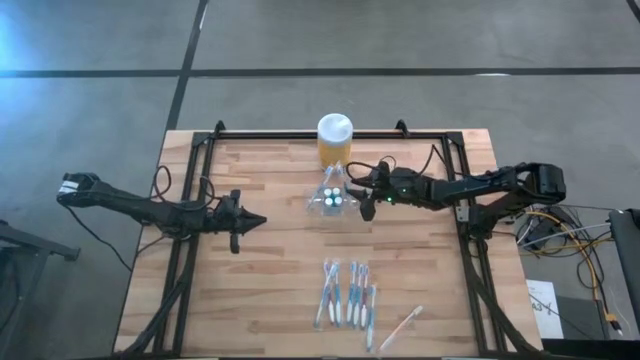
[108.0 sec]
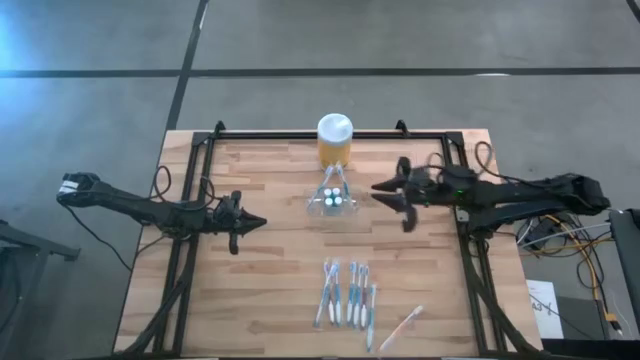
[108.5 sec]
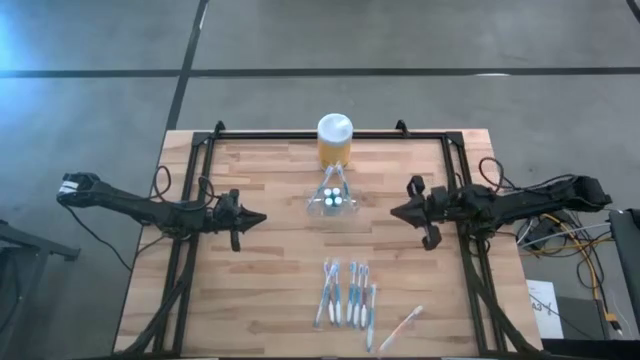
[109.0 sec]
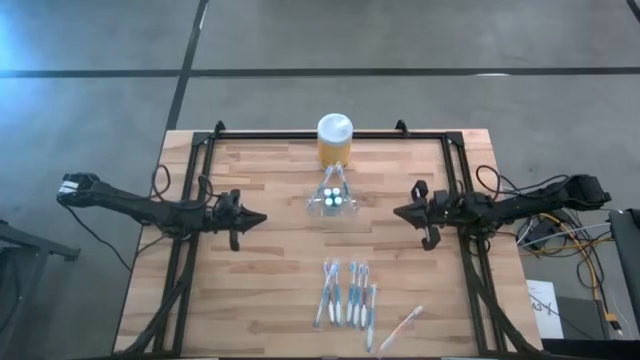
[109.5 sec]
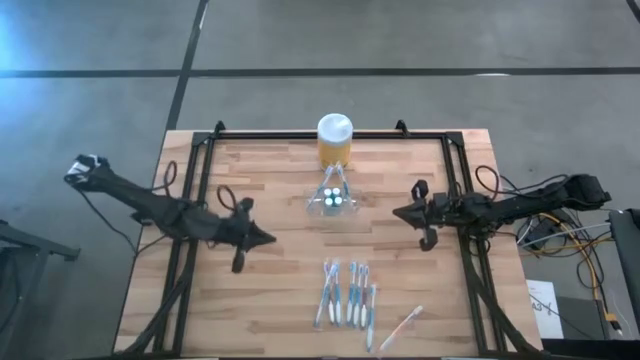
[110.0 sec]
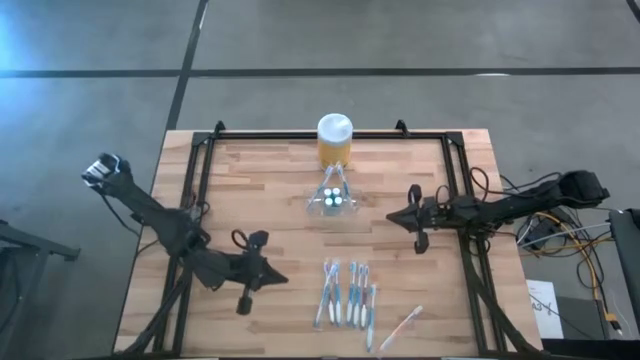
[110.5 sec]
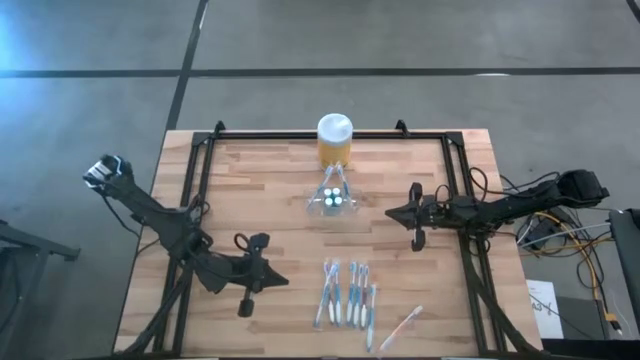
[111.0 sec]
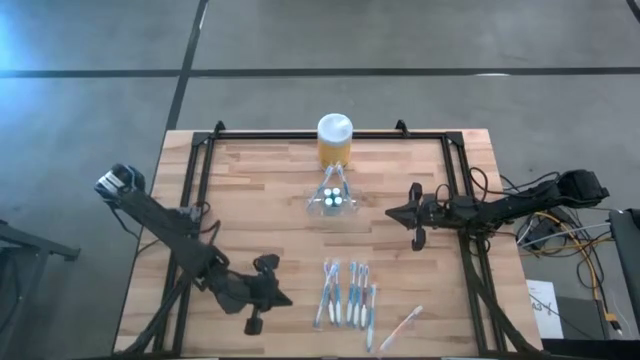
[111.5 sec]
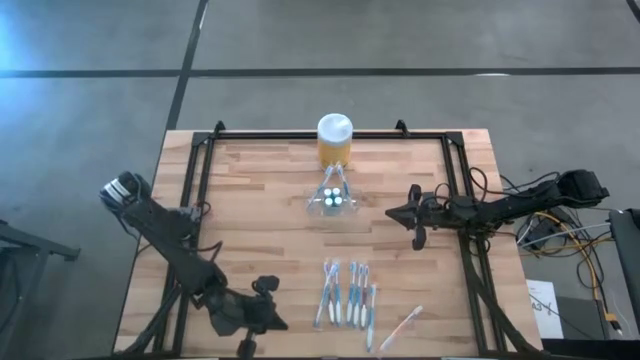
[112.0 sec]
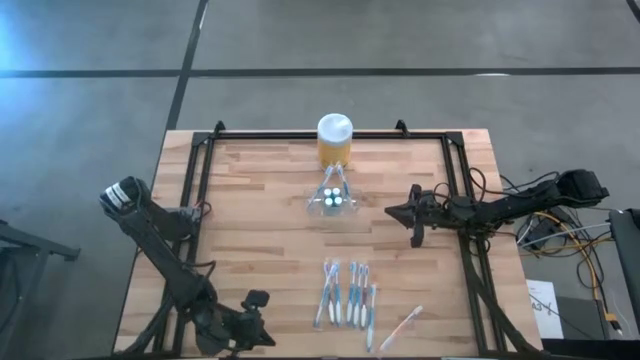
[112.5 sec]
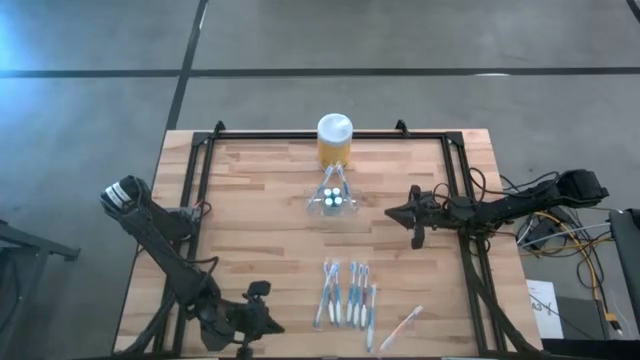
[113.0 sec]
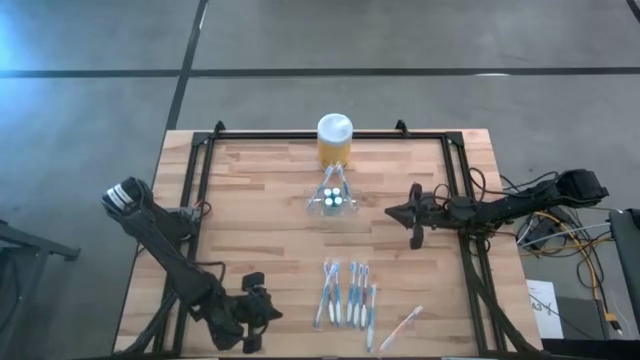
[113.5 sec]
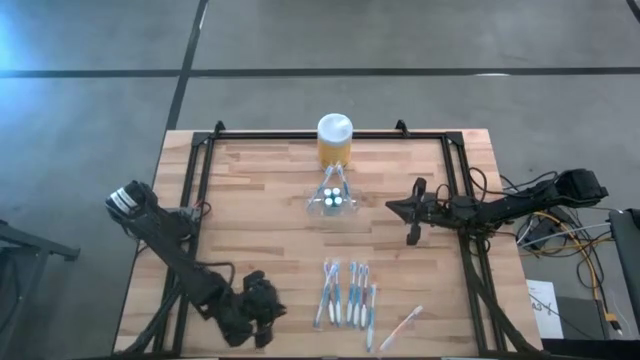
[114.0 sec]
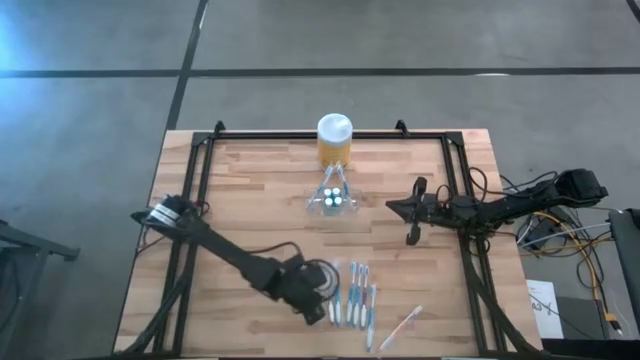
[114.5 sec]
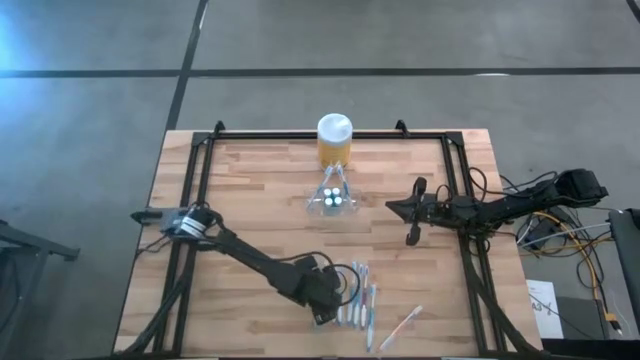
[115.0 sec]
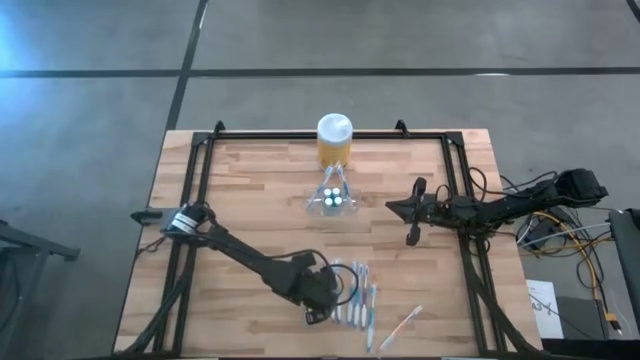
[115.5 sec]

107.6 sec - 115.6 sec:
Task: Pick & Place toothbrushing station
Put the blue toothbrush into the left of the transparent organizer

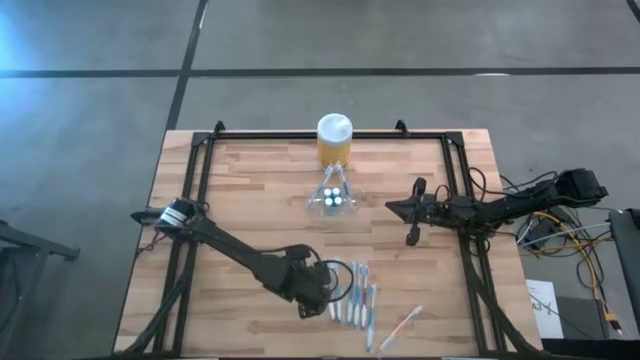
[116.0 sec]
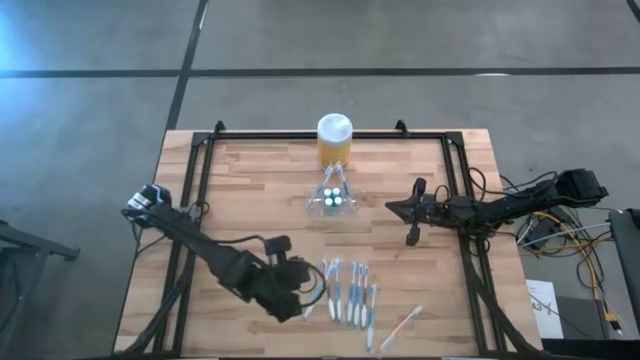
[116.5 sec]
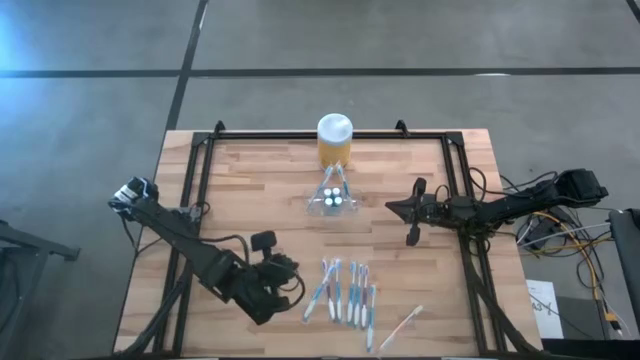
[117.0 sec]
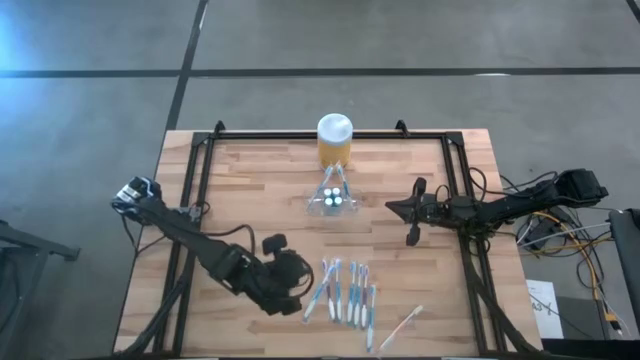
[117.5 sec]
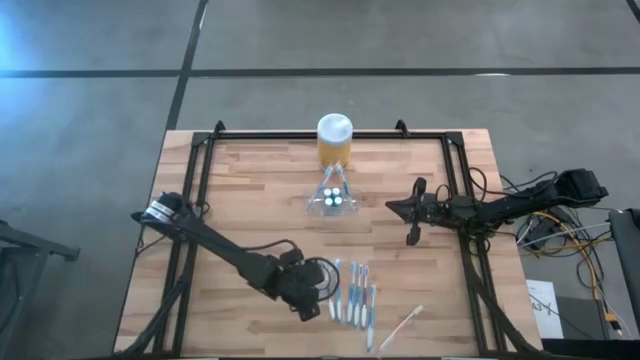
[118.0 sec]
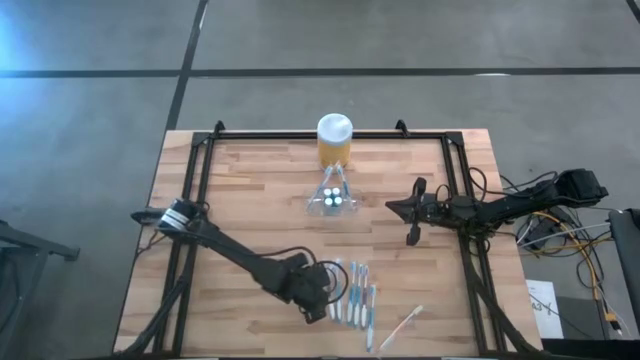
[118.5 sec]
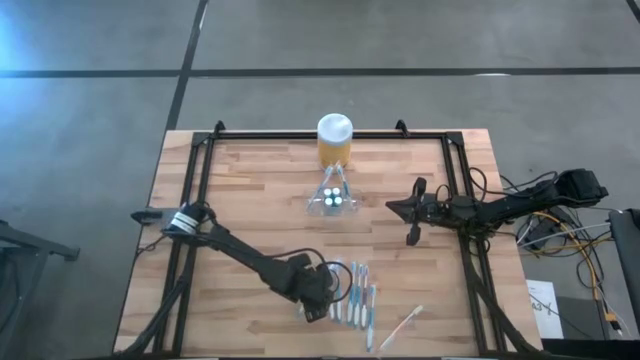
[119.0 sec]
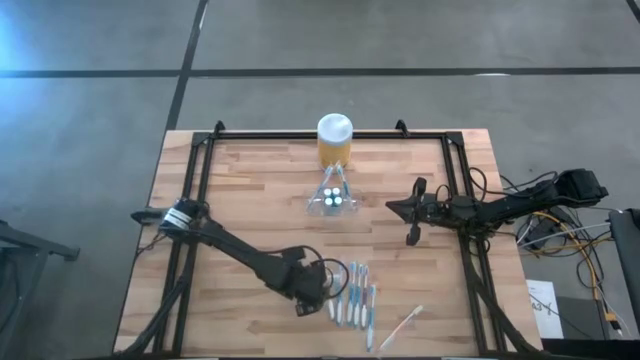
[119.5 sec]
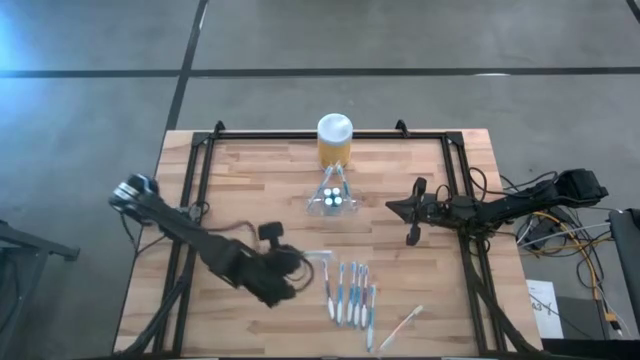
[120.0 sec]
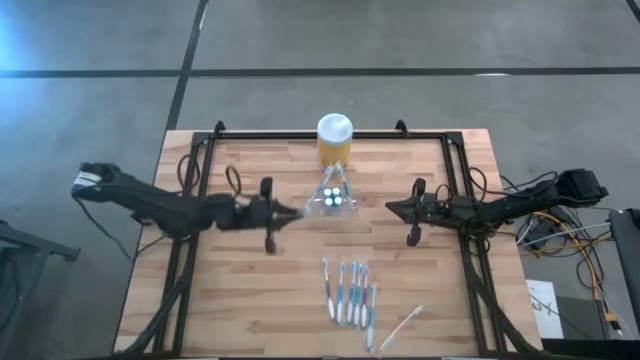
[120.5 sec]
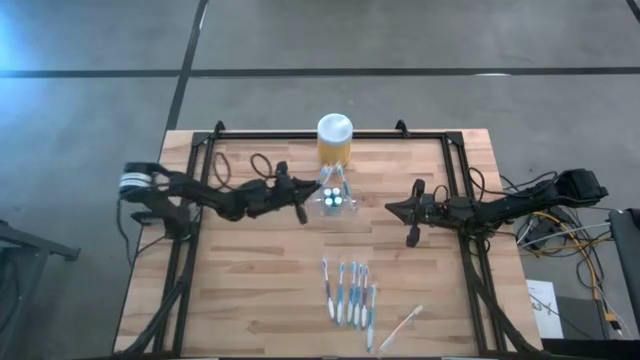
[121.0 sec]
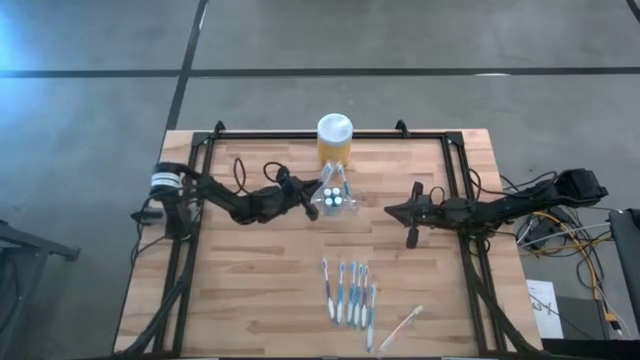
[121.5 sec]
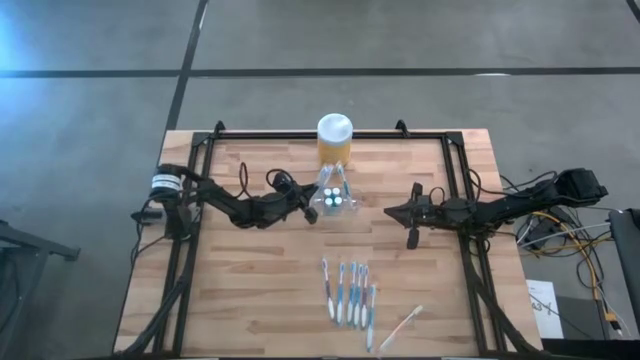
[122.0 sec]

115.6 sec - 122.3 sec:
Put the blue toothbrush into the left of the transparent organizer

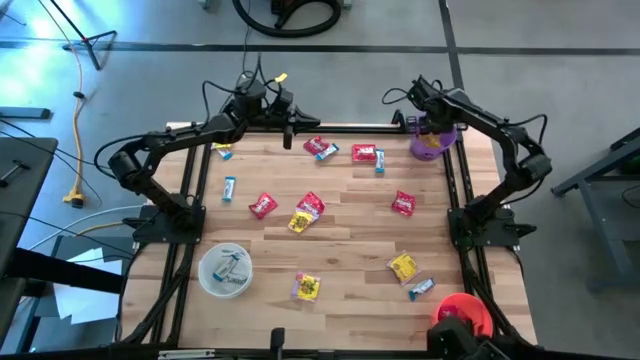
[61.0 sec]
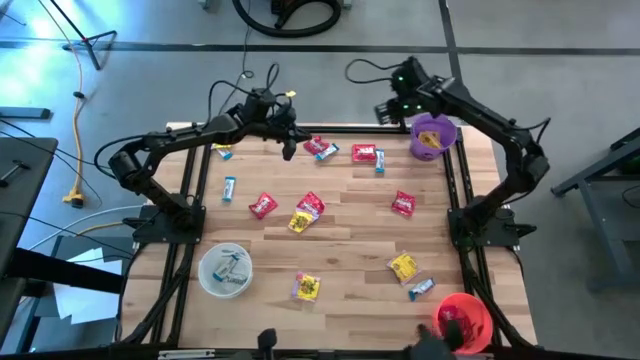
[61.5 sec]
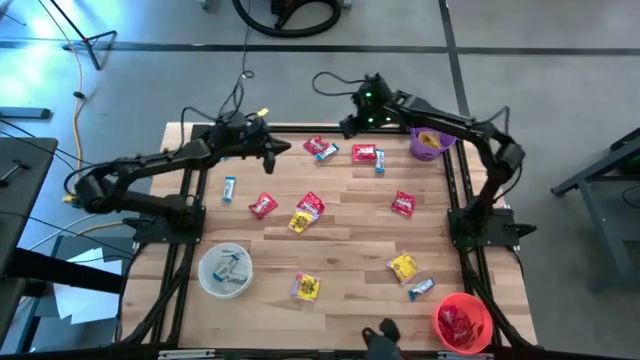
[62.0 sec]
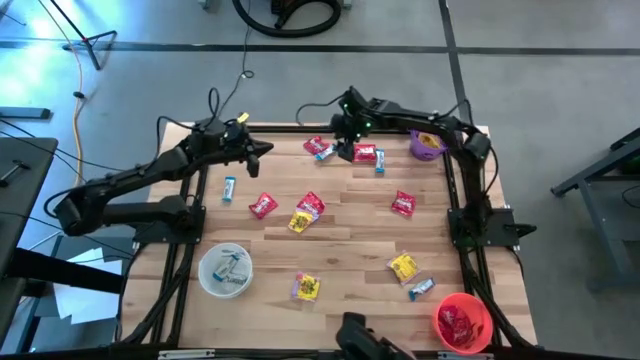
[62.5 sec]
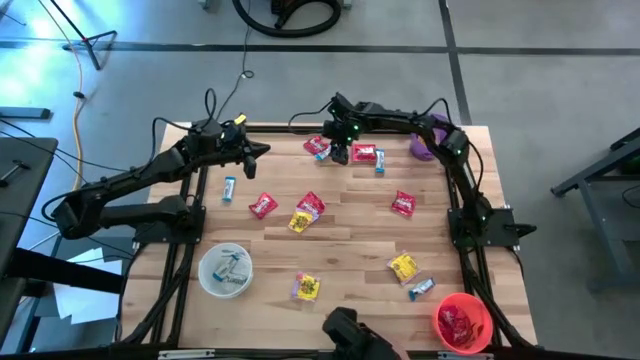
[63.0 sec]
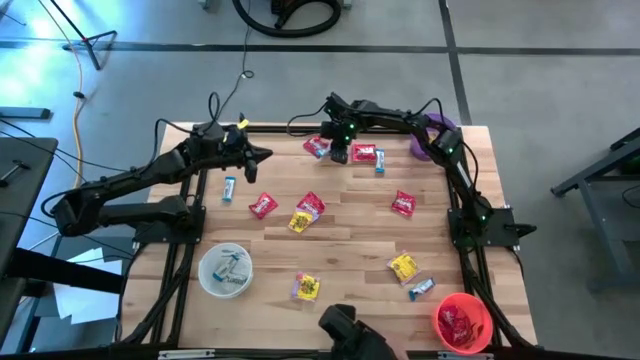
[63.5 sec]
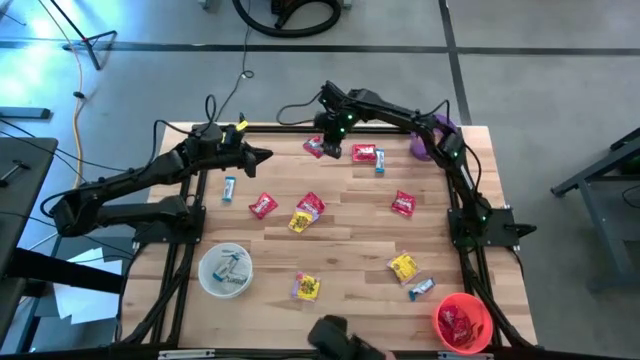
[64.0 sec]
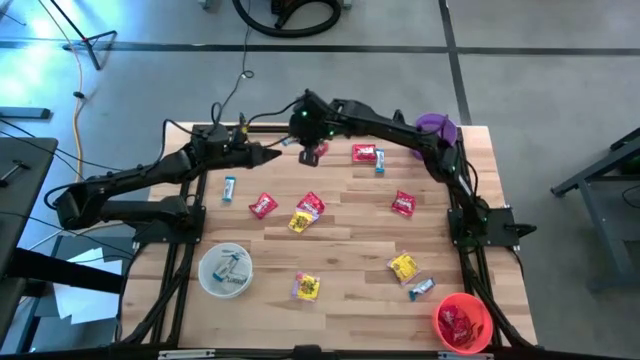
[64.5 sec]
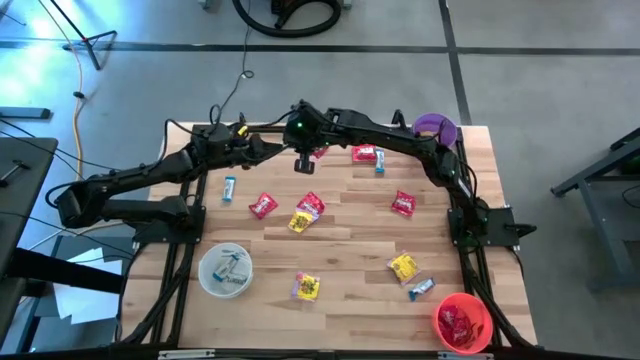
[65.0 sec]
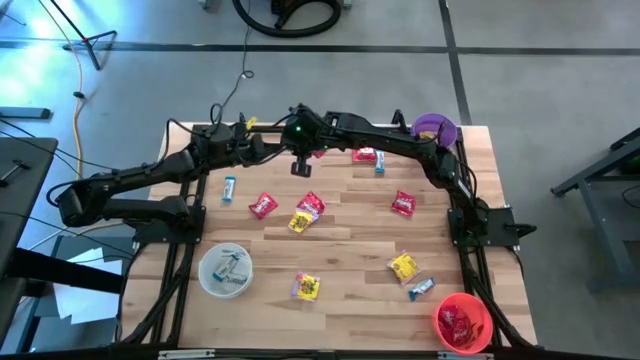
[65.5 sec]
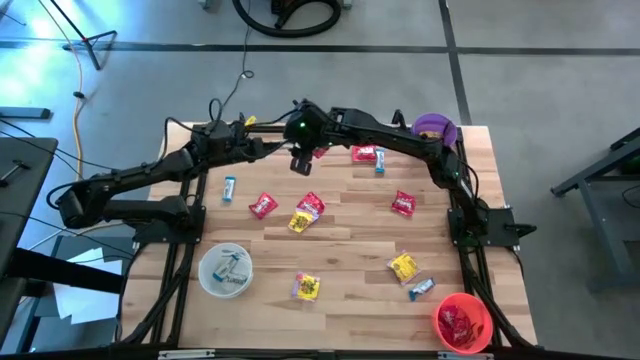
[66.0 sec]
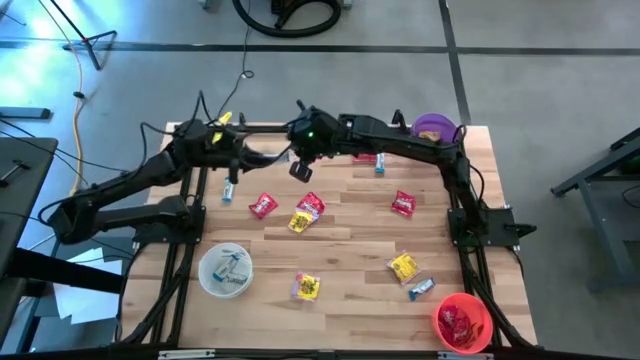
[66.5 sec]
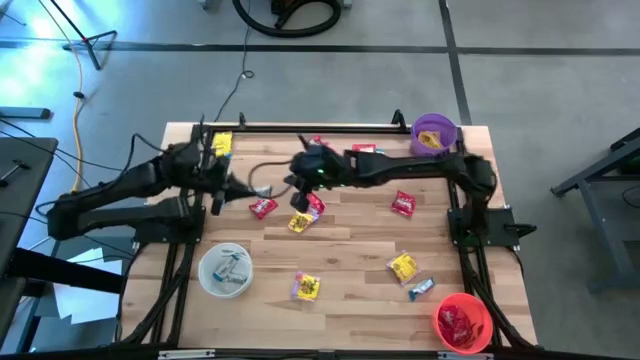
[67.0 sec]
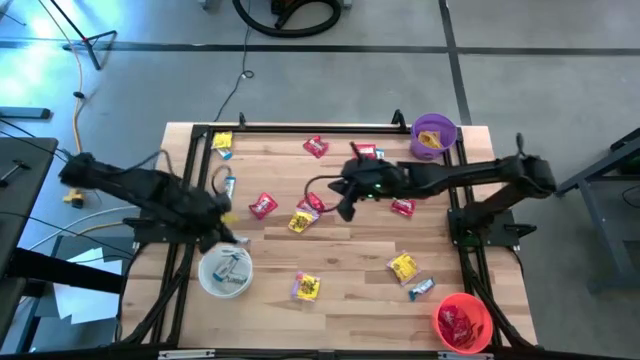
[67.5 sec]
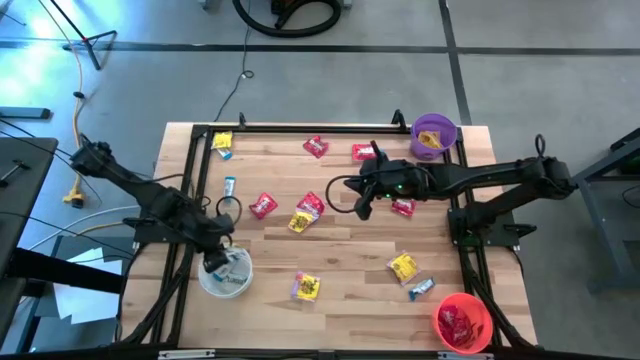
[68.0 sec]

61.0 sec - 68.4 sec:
Task: Sort candy
Put the white chocolate bar into the white bin
